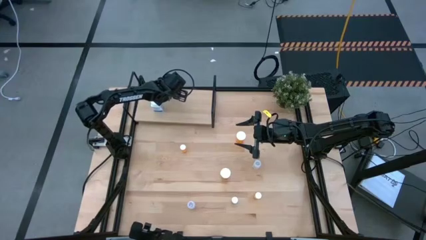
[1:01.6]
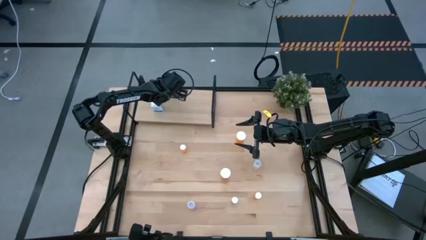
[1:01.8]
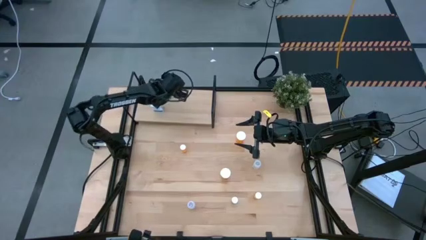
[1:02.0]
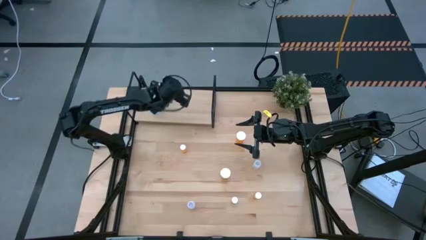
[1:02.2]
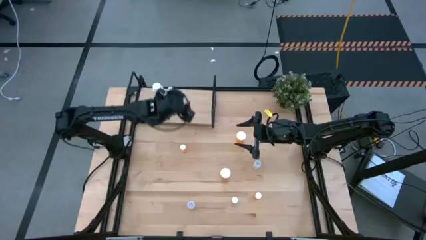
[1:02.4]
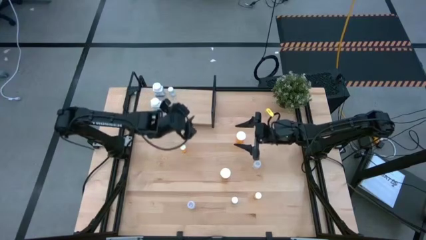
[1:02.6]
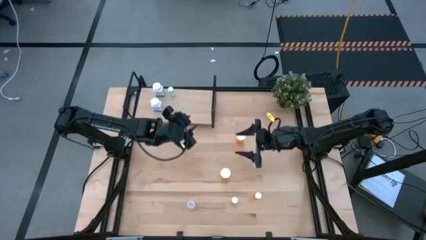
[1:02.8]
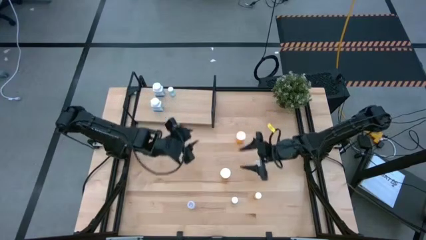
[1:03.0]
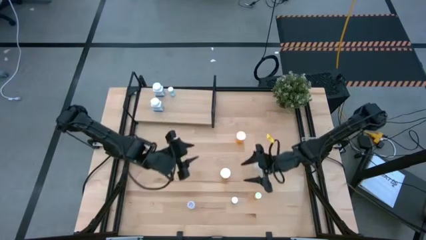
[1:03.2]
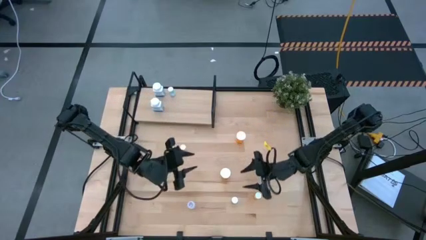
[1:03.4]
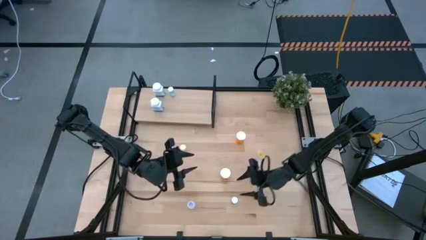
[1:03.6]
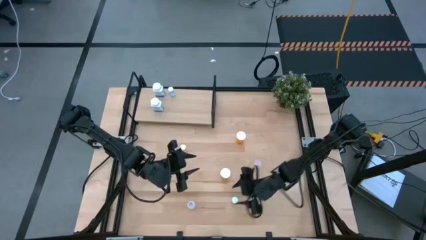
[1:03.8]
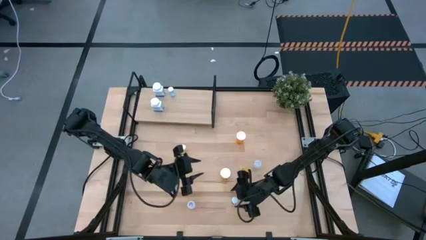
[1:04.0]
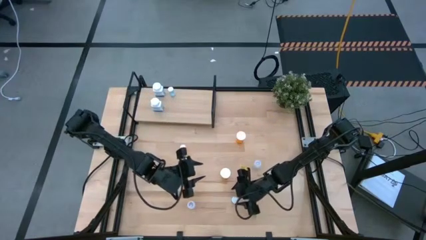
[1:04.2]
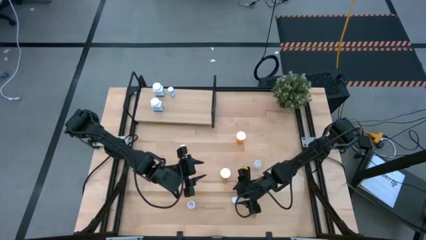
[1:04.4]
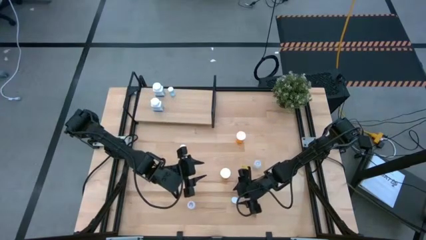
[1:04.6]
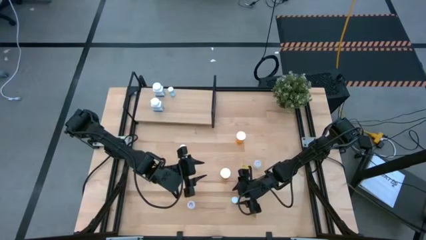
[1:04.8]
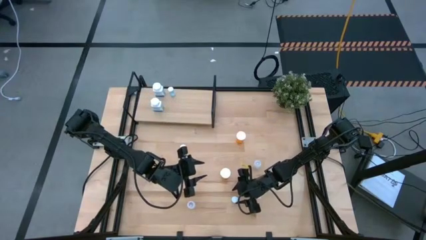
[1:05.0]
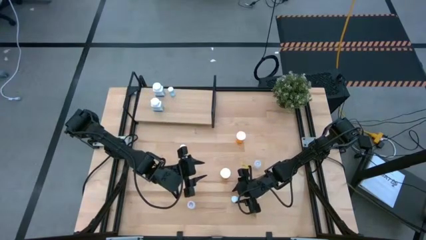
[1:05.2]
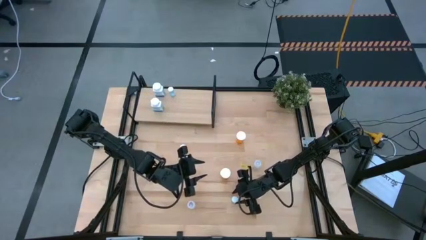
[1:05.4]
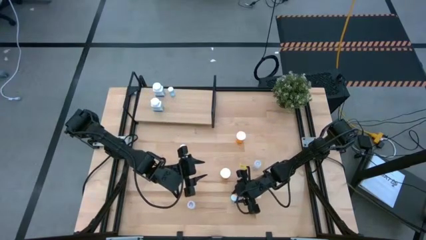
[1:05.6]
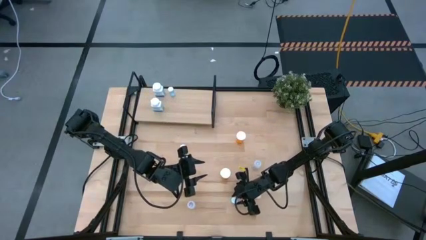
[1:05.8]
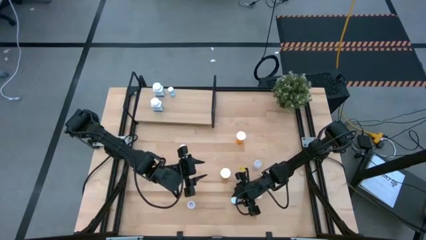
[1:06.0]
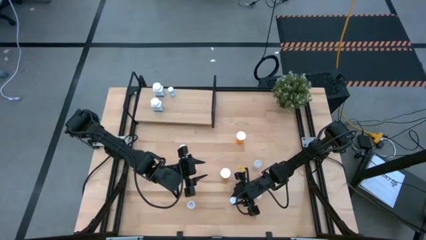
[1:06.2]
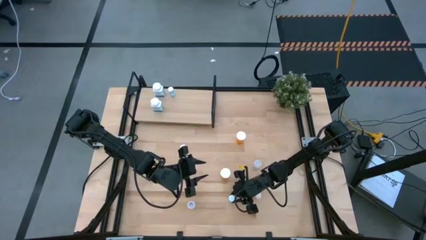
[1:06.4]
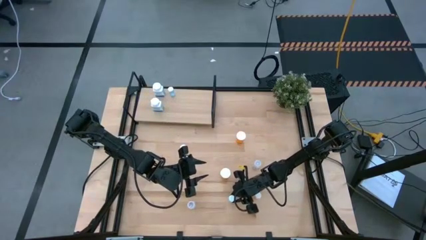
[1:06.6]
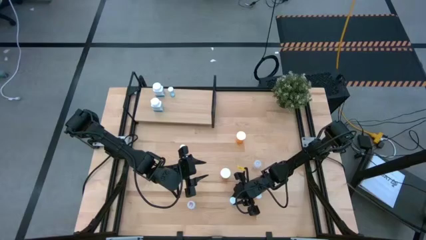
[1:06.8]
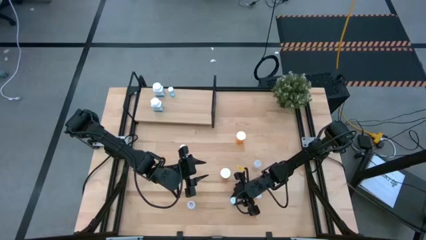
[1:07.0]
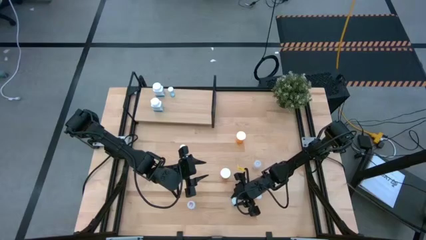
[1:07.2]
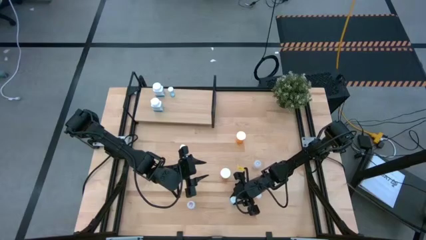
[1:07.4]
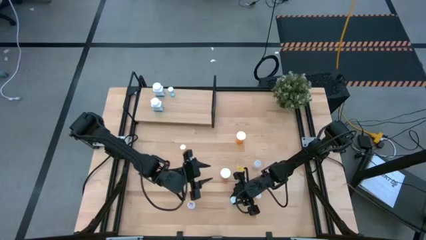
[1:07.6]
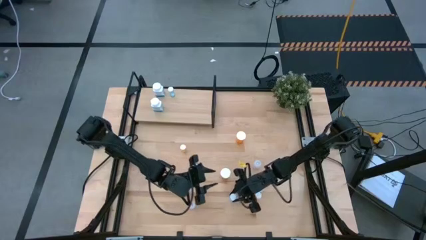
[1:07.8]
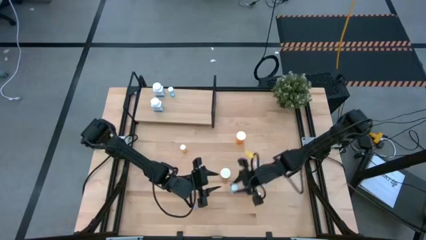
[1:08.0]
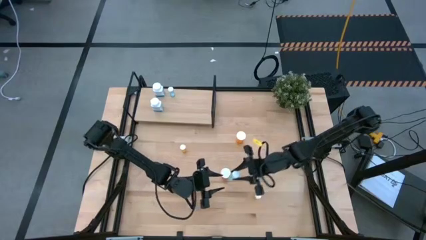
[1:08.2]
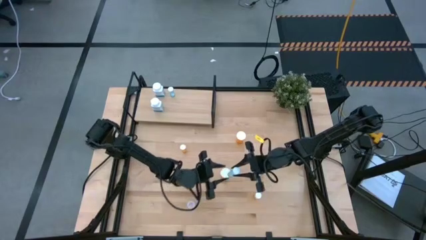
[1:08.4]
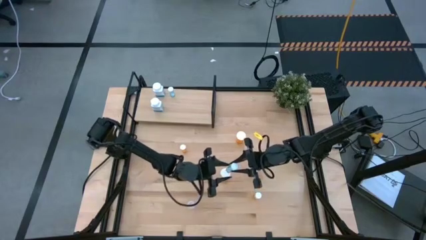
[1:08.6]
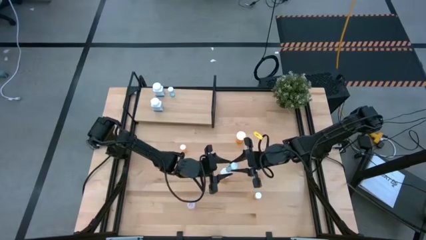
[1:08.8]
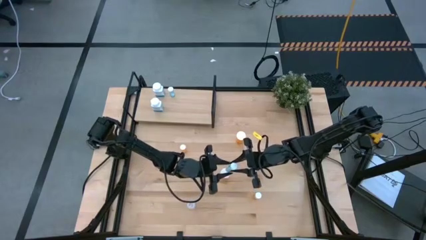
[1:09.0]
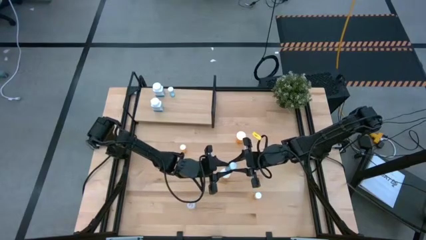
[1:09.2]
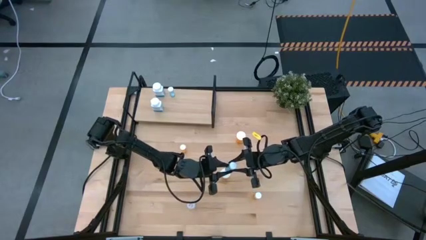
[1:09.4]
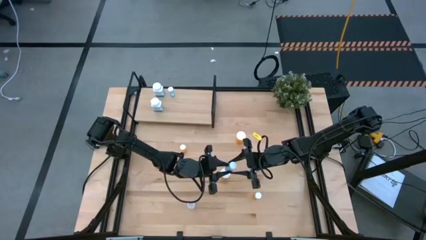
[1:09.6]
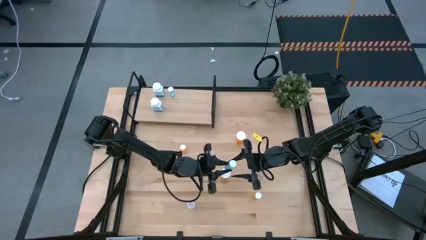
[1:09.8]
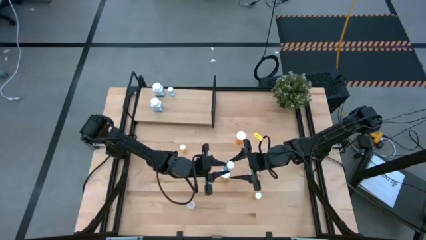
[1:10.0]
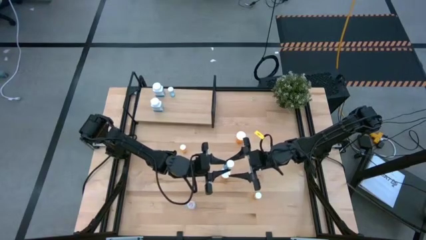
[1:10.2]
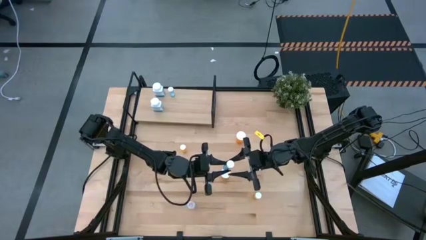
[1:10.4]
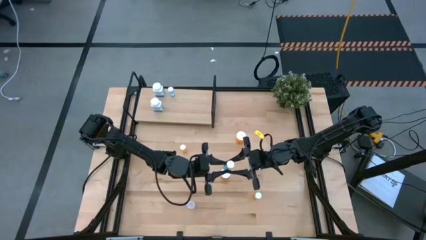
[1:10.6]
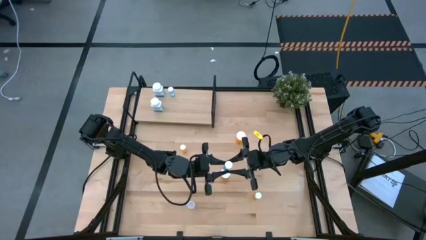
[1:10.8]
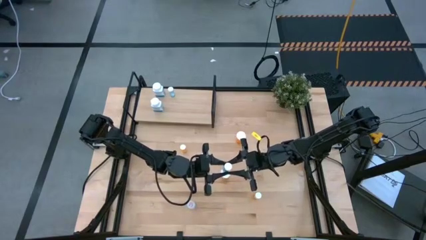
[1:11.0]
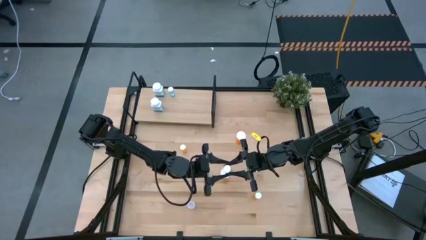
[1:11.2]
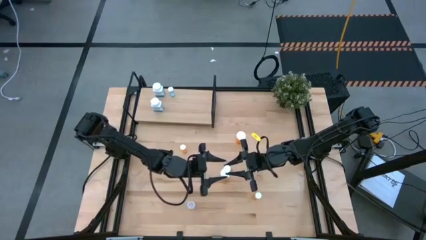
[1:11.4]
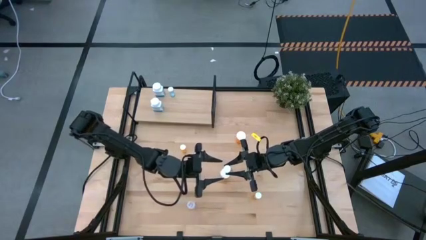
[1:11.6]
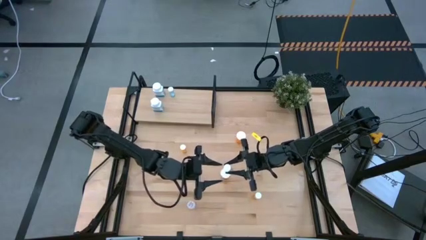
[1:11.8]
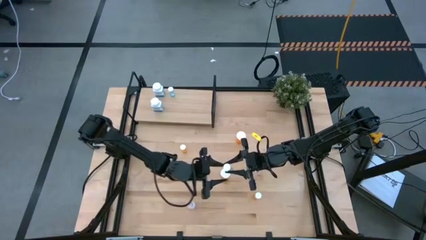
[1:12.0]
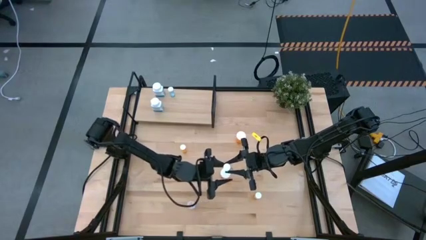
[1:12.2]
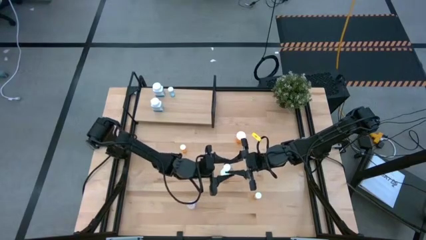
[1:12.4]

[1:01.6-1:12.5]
Task: Pick and place medicine bottles onto shelf by color
Put the blue pill bottle aligned with the other blue pill bottle on the shelf
